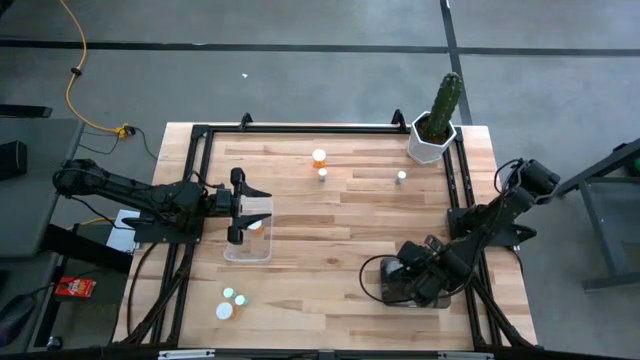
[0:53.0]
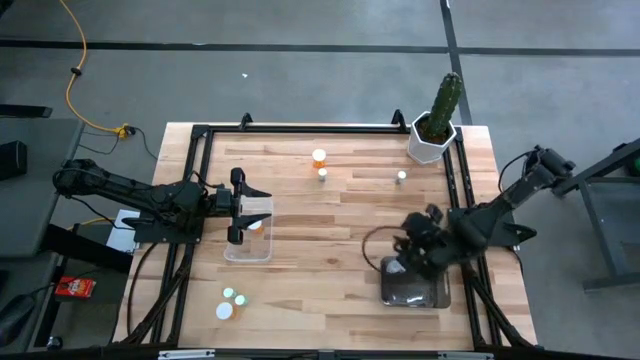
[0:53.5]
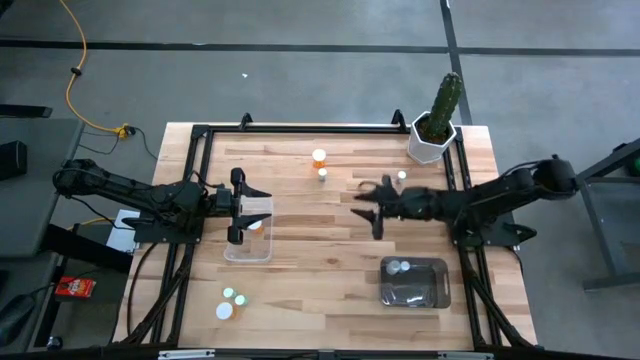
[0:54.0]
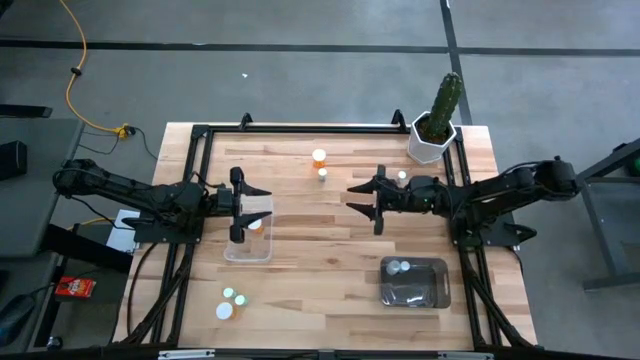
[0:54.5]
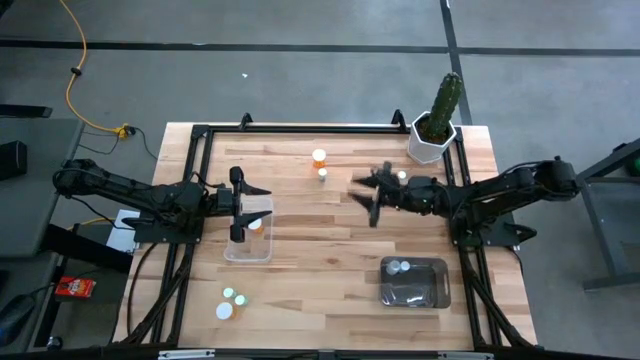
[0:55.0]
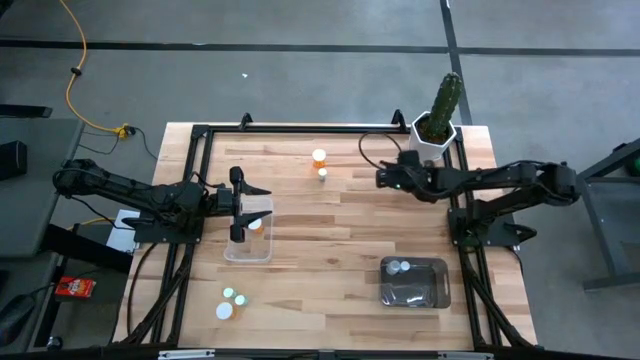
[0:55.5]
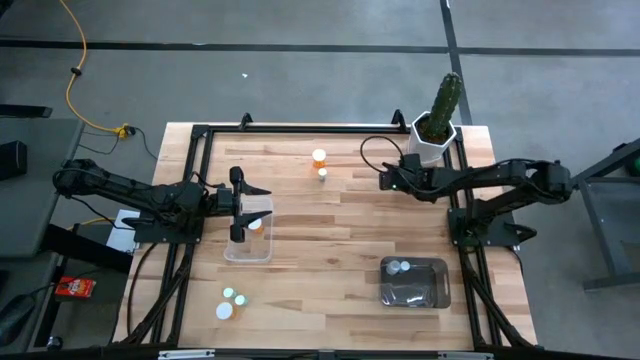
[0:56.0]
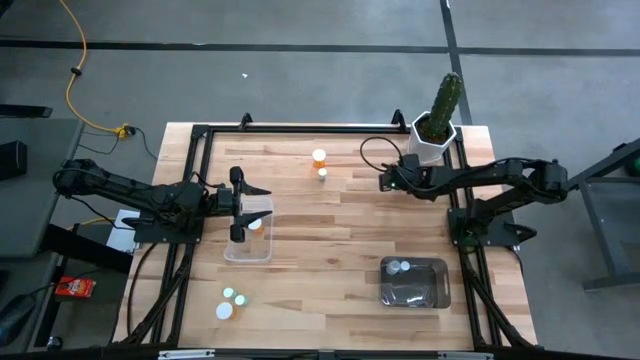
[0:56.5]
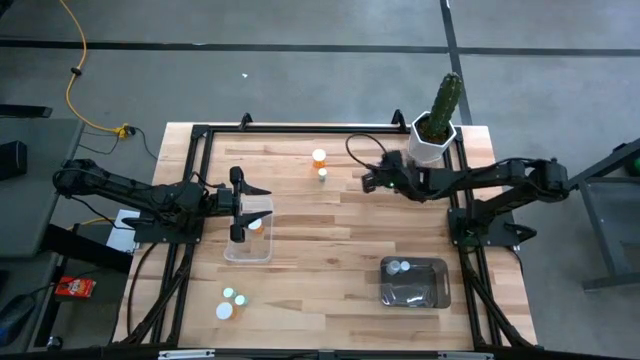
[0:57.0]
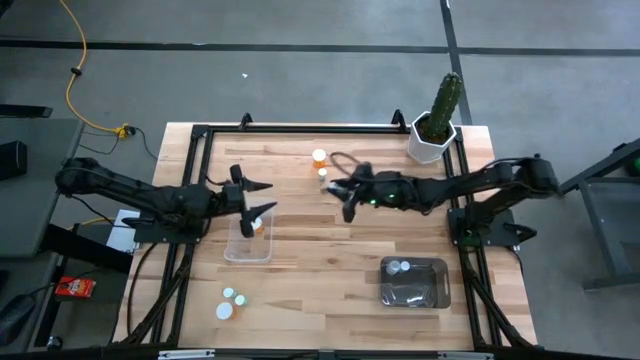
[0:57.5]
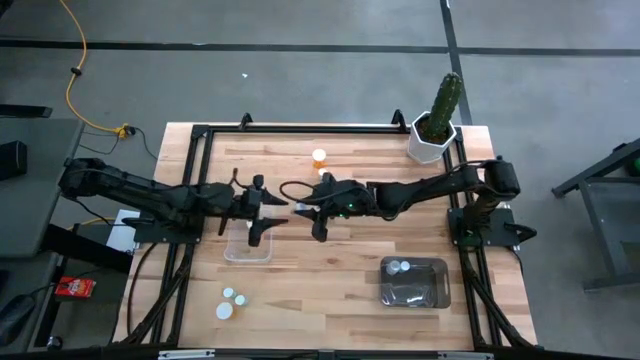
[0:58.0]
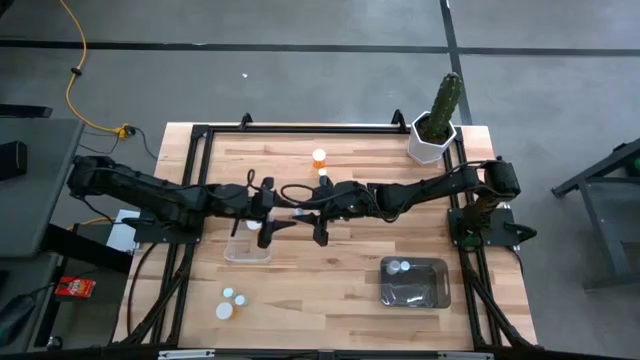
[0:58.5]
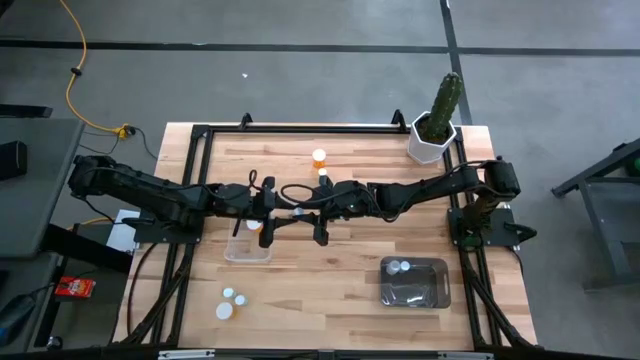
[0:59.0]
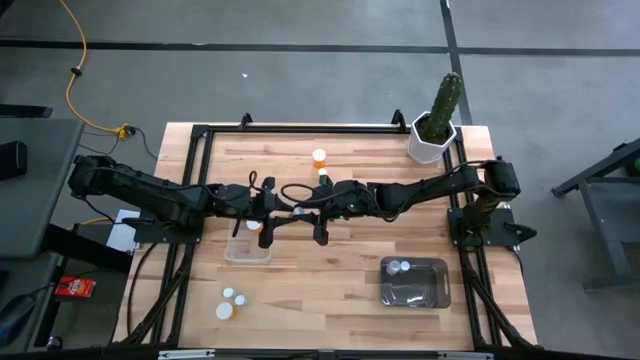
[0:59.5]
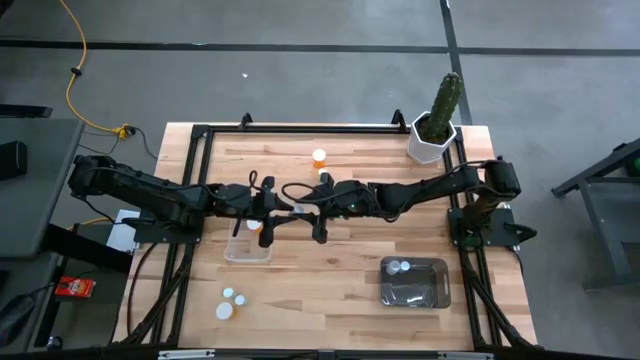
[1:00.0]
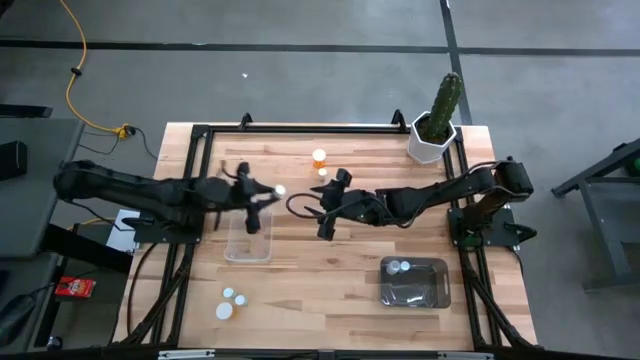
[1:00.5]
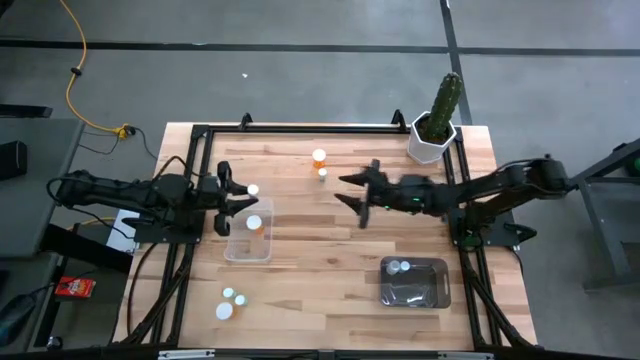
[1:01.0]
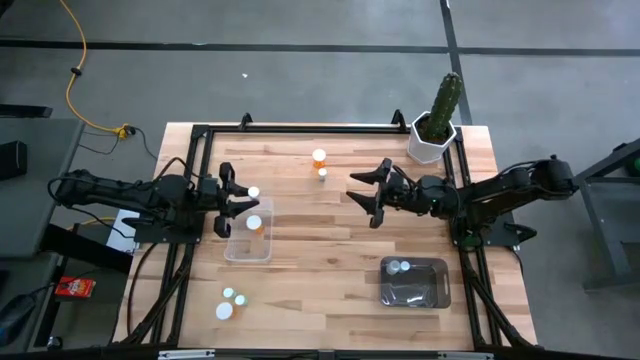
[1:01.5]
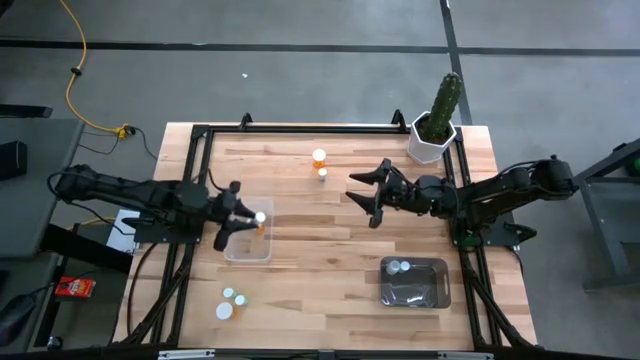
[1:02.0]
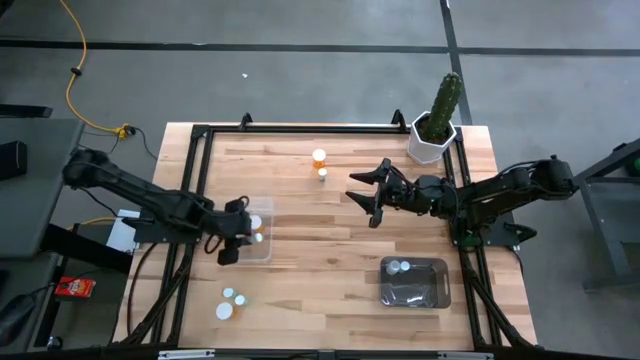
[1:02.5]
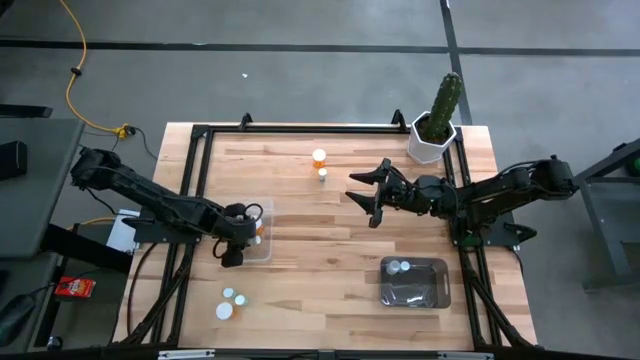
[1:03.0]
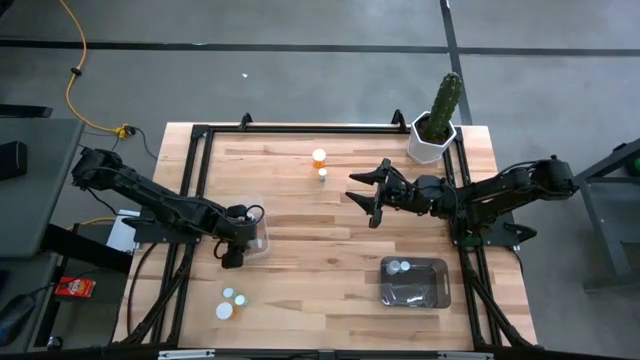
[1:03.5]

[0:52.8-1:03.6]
Task: Pick and place medicine bottles into bin by pill shape (circle, oval)
Put the right blue capsule bottle into the transparent bin

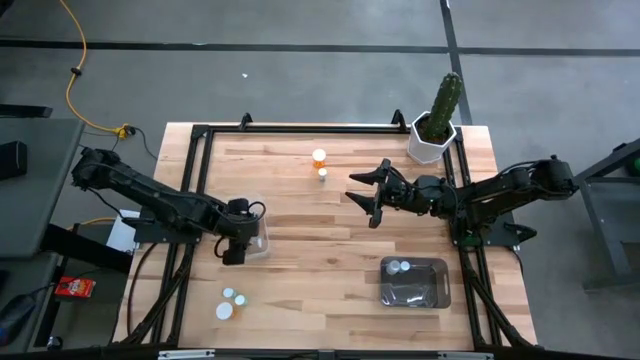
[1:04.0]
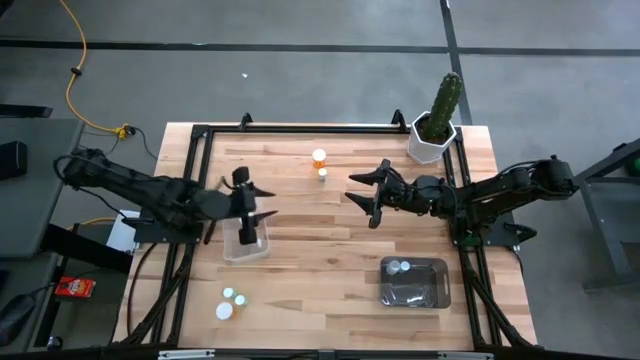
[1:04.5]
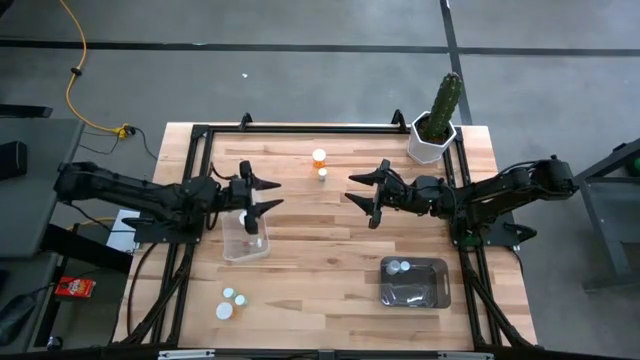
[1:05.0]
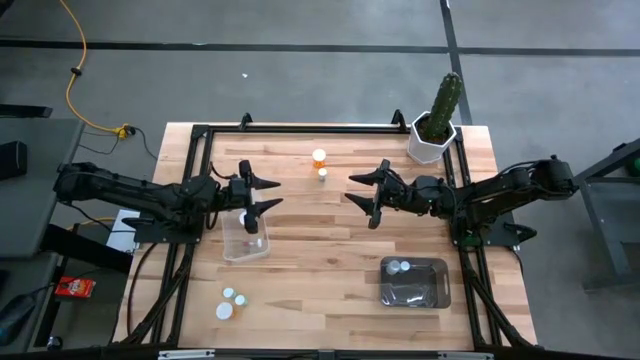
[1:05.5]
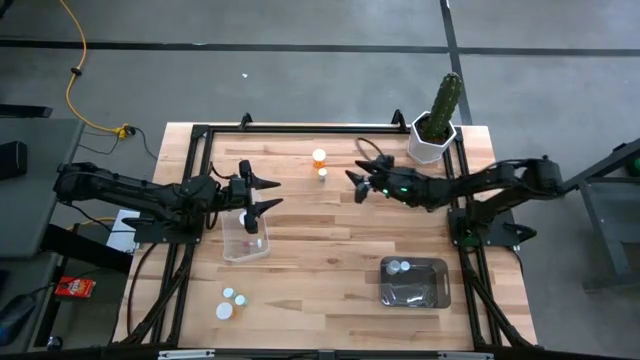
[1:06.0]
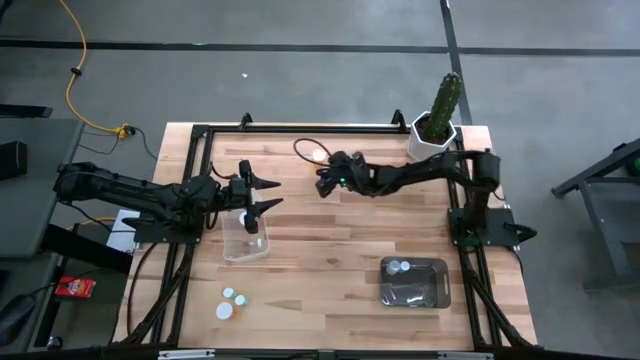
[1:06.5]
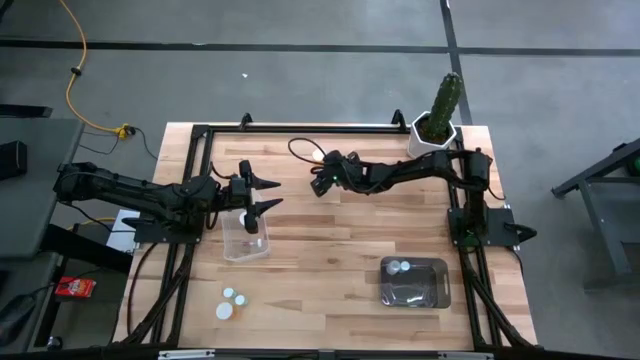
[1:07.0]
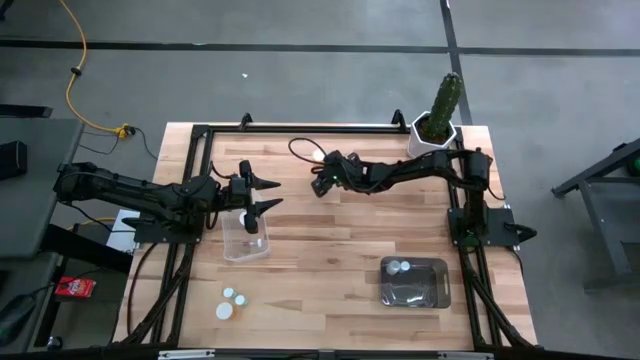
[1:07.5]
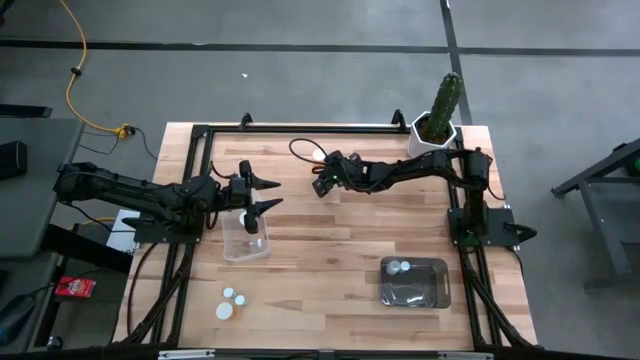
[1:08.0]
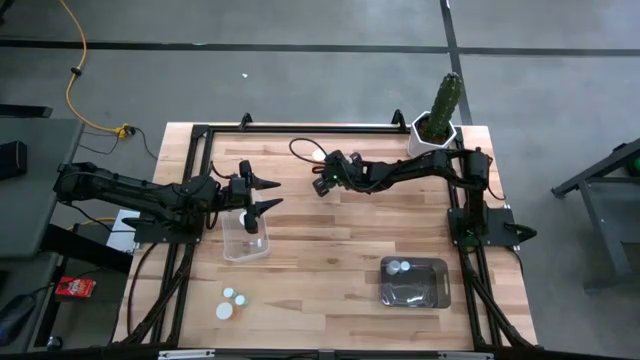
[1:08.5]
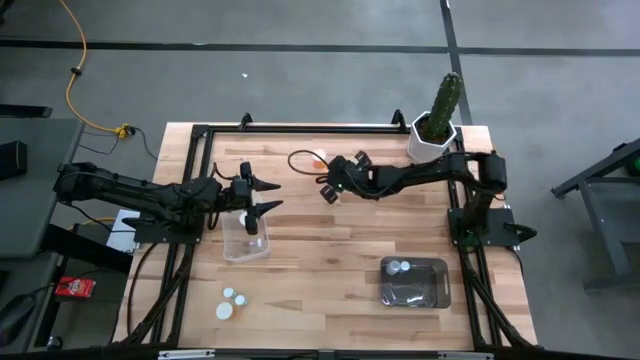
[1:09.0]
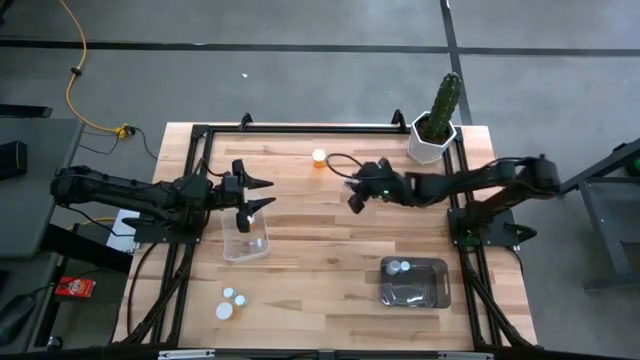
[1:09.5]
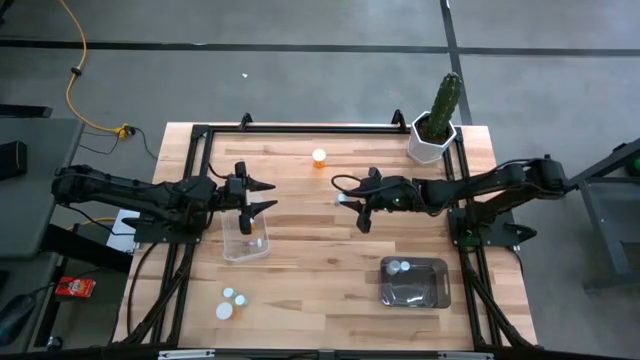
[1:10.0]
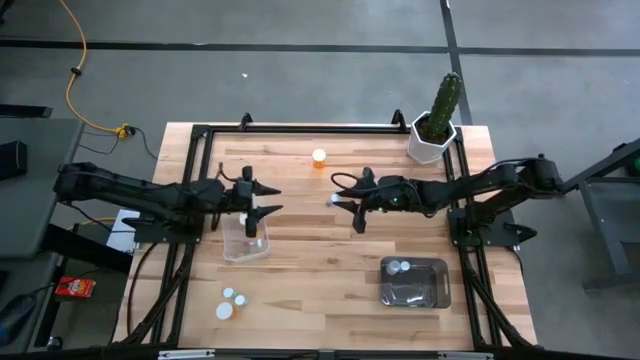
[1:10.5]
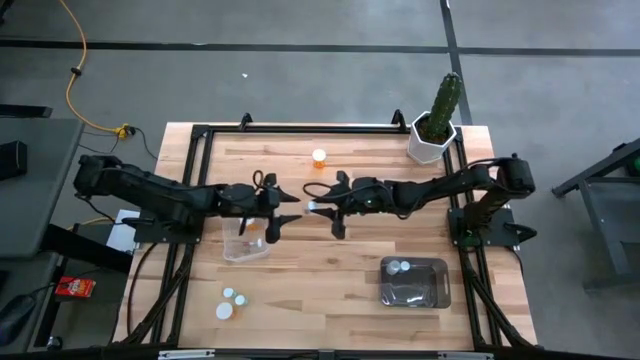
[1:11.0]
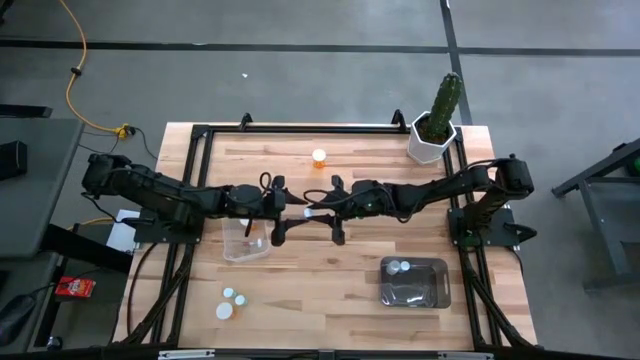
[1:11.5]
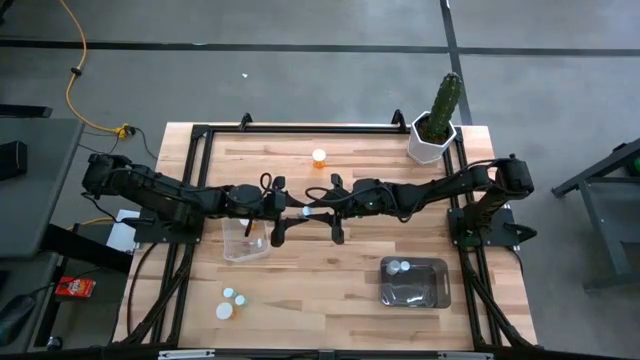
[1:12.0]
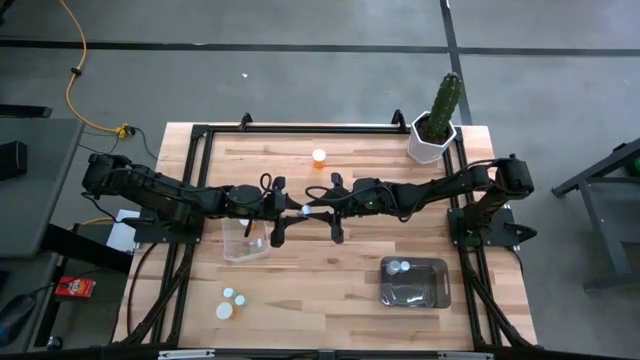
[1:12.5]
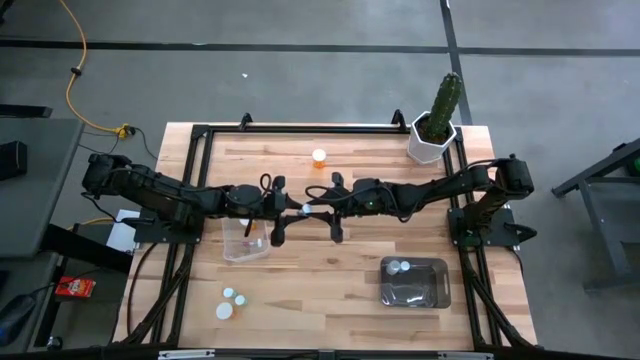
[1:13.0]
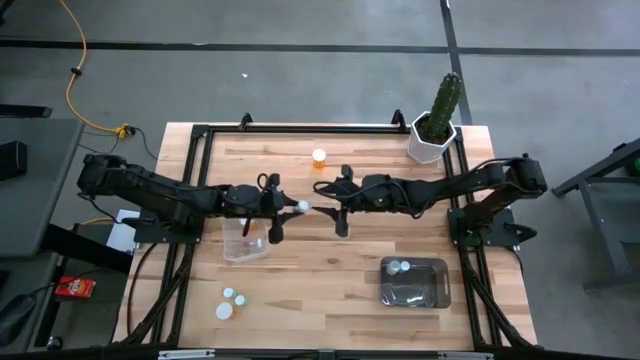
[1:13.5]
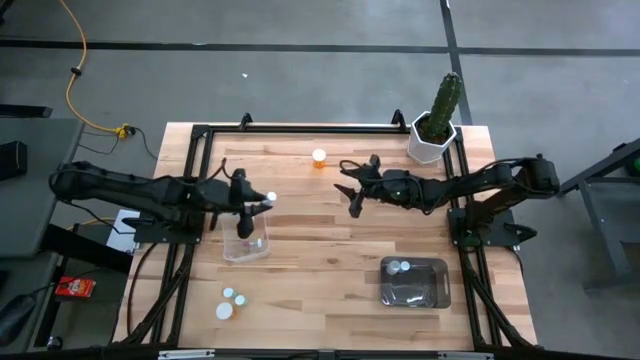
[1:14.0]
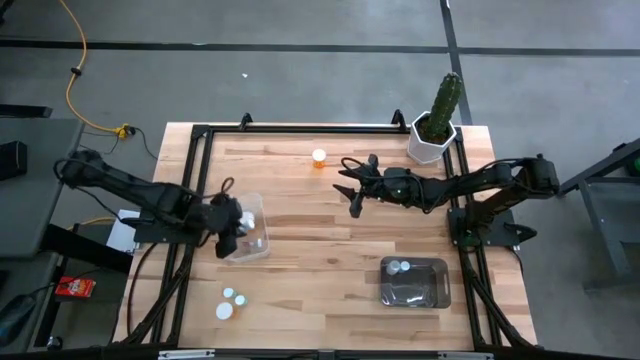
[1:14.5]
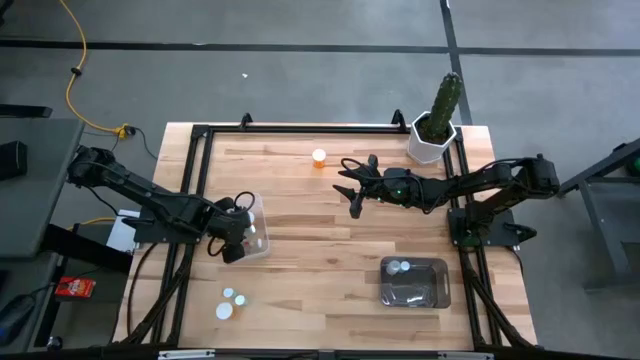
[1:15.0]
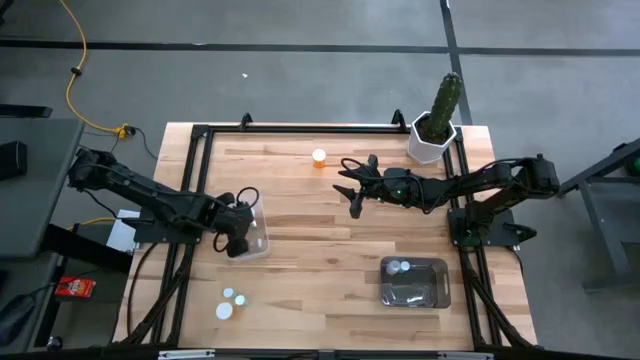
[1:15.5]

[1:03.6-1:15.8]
Put the blue capsule bottle into the transparent bin
